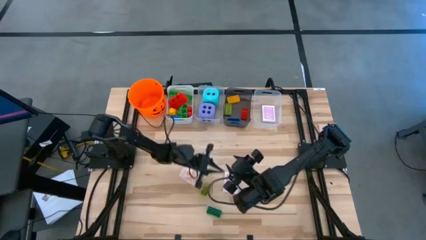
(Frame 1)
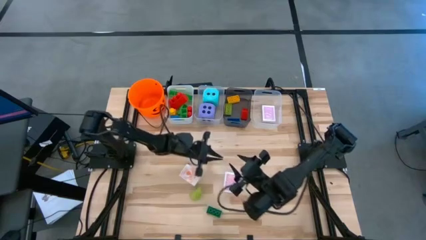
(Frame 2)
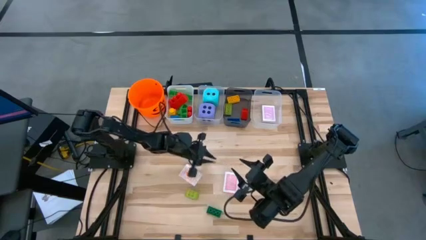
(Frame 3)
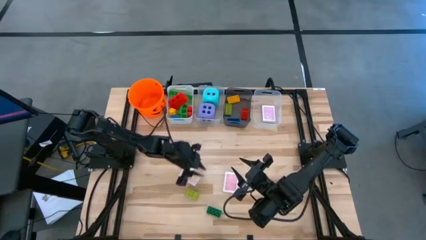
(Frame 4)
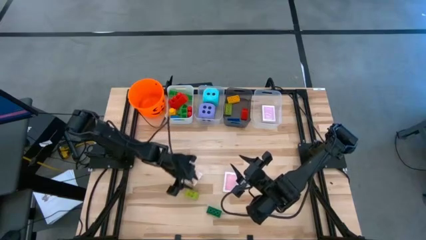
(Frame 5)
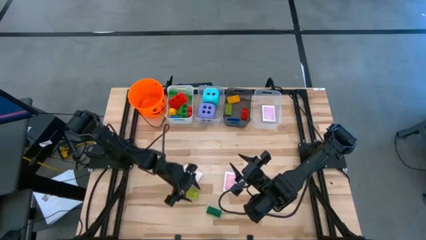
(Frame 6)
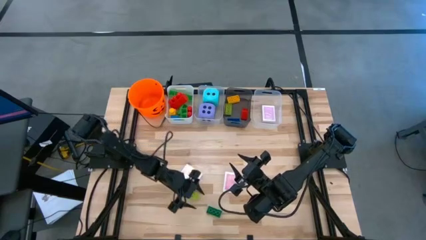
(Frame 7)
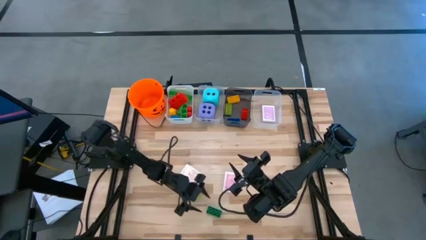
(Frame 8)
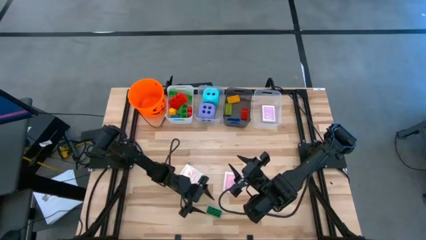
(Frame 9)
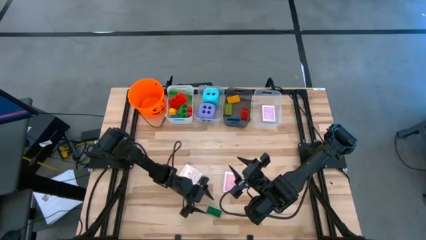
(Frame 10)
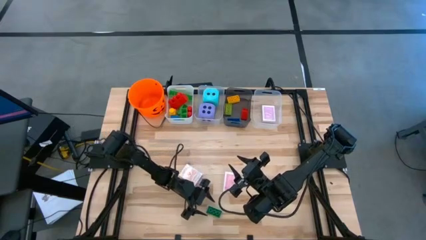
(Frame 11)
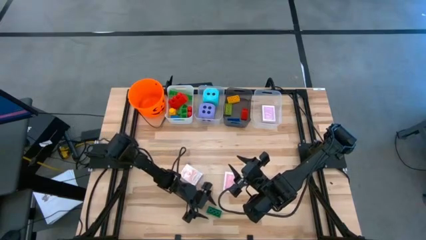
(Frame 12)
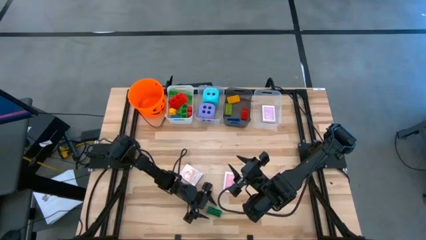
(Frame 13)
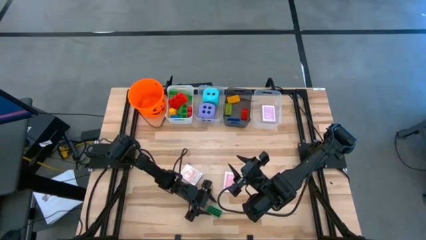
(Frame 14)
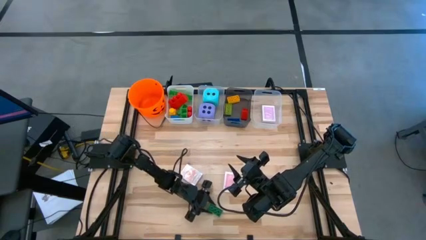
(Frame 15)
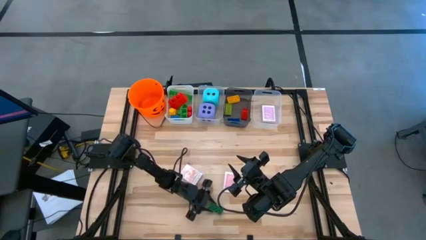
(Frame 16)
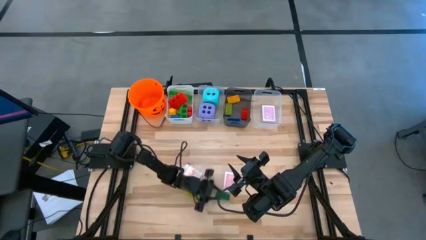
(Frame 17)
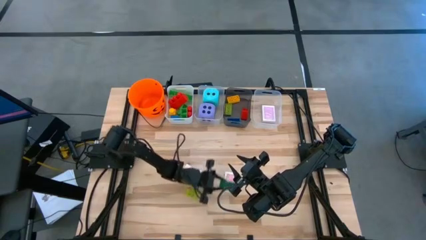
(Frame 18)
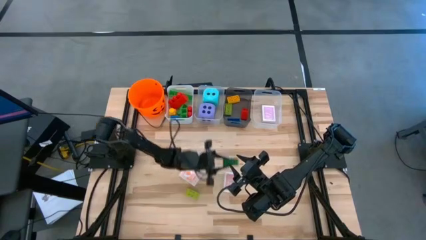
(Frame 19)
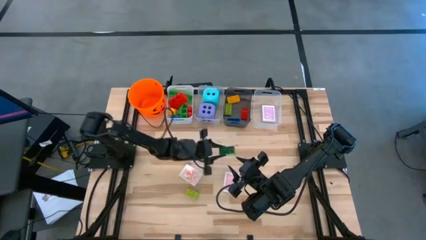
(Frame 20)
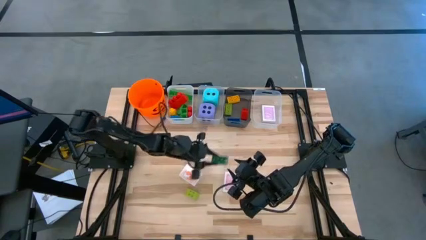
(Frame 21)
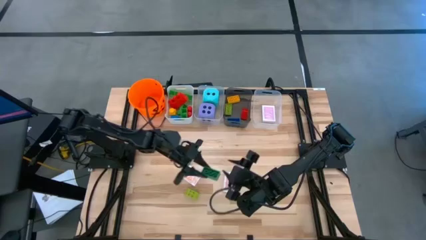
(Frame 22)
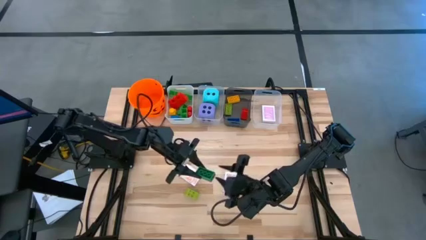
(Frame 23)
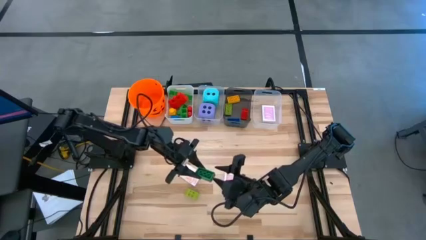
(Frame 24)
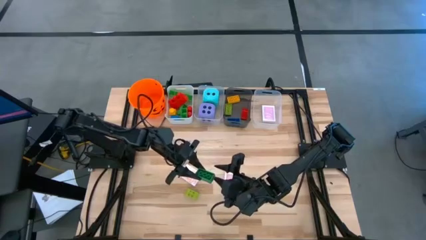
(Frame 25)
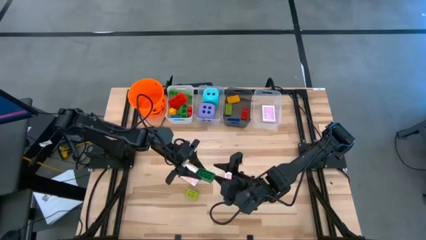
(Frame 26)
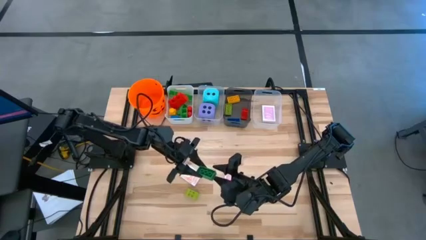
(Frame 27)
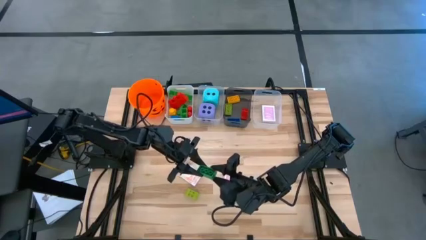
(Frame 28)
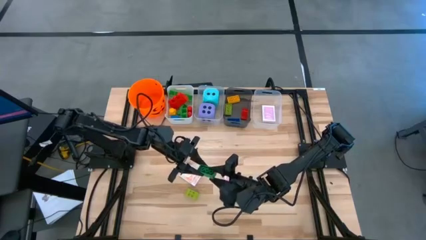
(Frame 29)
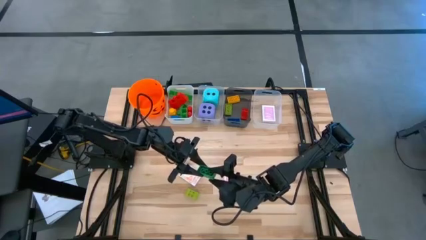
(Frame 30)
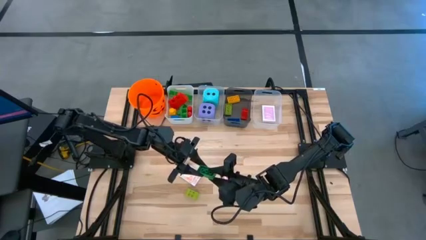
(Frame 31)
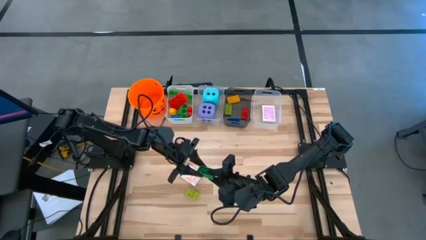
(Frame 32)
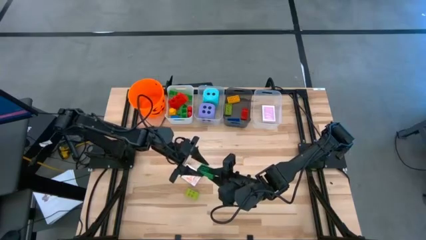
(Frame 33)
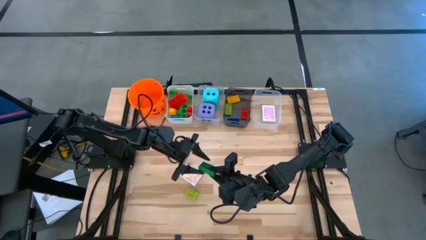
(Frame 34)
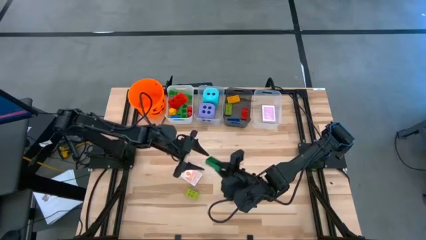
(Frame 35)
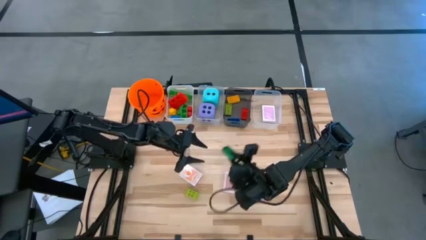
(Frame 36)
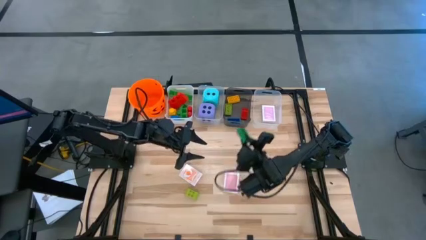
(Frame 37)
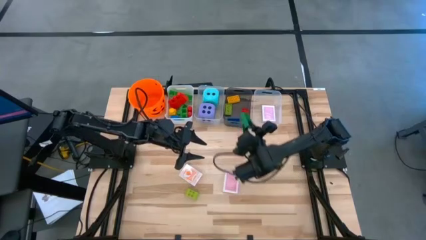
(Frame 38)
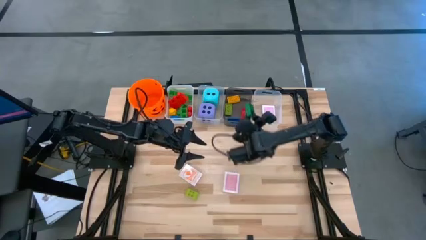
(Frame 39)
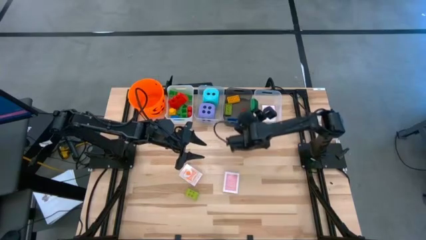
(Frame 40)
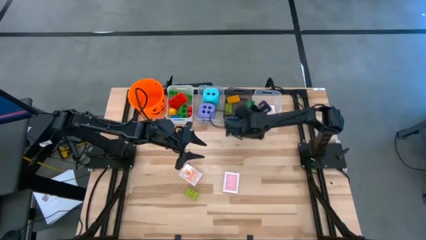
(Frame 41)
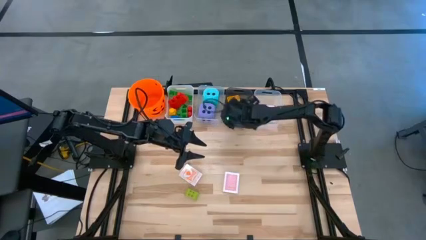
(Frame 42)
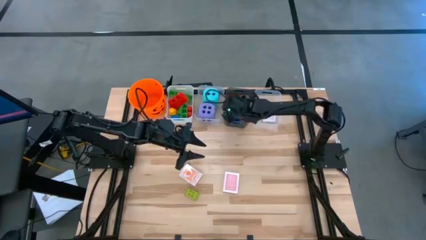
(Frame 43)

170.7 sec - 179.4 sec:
Task: Pick & Place Toys
Put the green game piece into the black bin

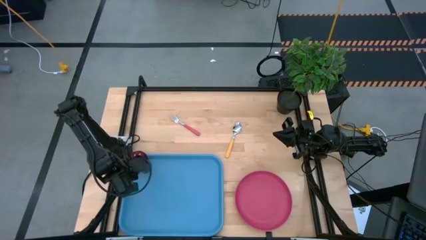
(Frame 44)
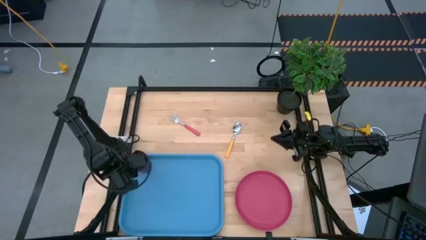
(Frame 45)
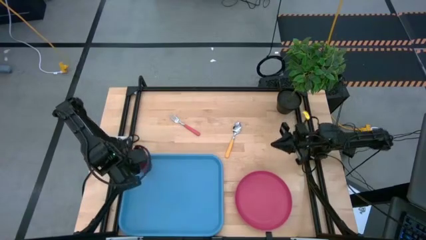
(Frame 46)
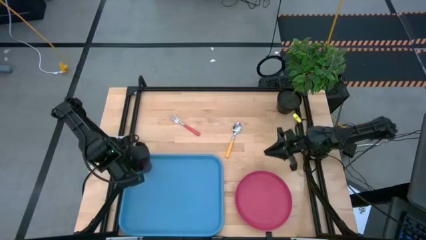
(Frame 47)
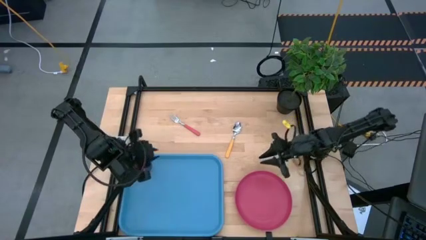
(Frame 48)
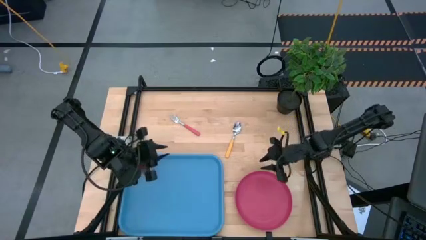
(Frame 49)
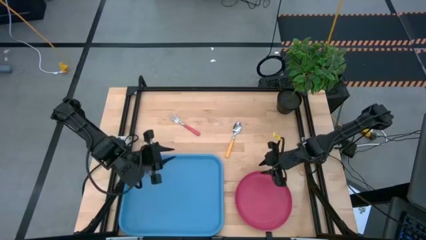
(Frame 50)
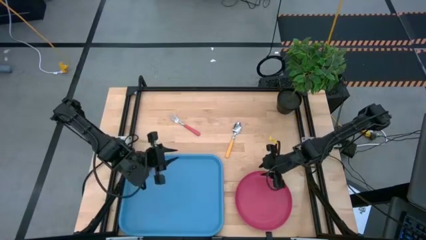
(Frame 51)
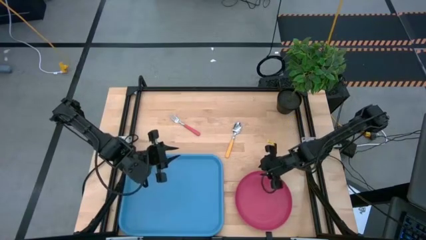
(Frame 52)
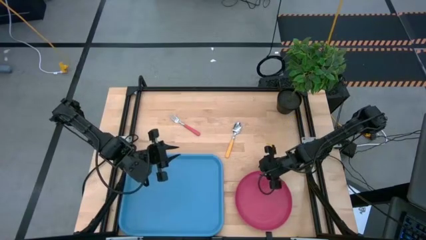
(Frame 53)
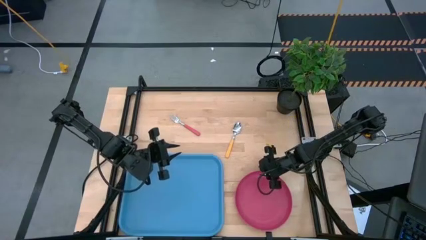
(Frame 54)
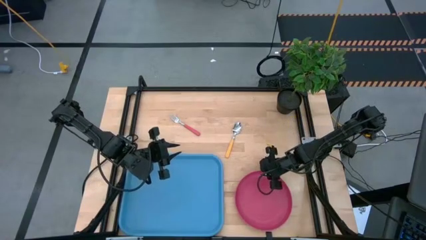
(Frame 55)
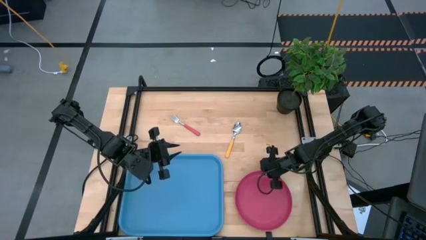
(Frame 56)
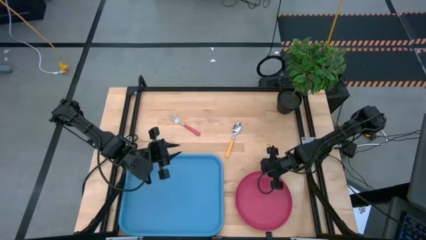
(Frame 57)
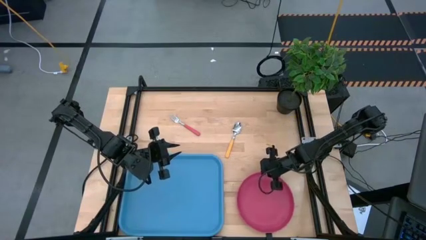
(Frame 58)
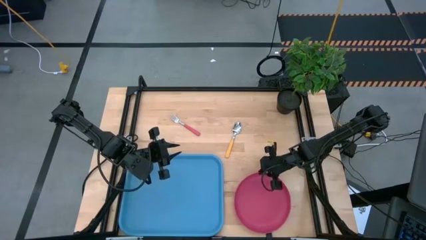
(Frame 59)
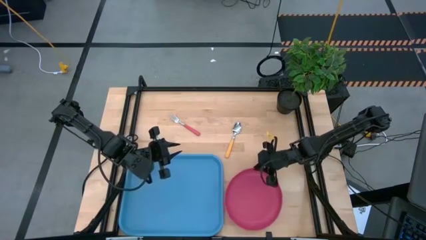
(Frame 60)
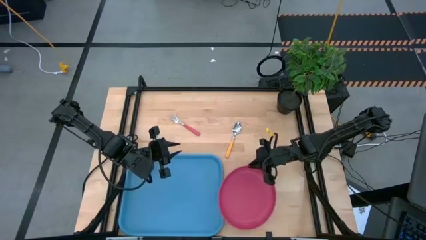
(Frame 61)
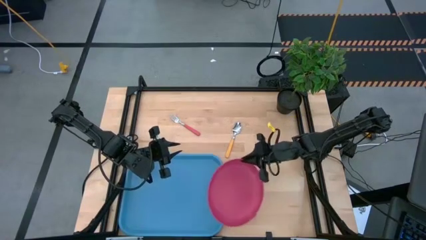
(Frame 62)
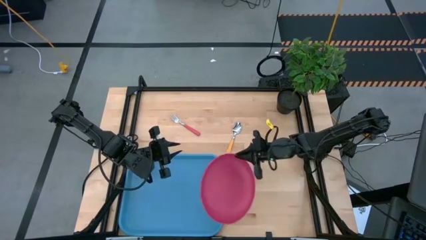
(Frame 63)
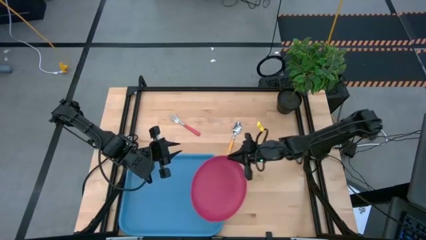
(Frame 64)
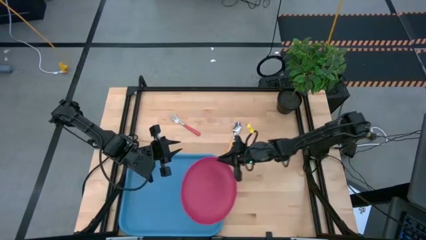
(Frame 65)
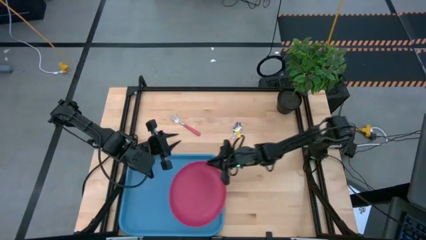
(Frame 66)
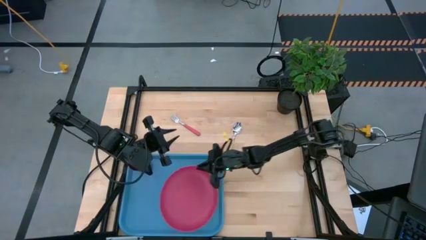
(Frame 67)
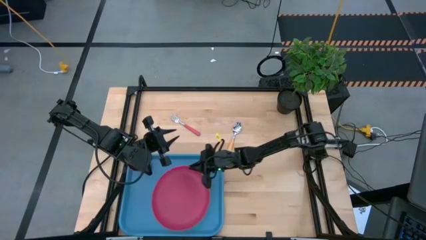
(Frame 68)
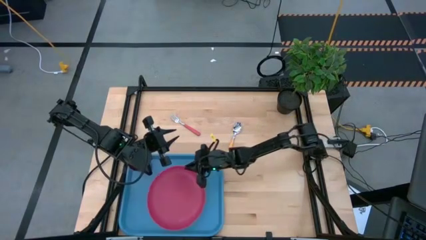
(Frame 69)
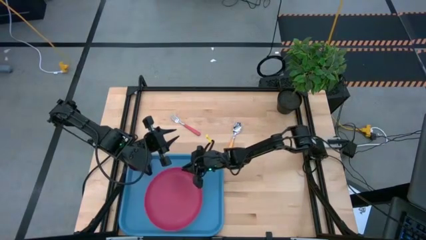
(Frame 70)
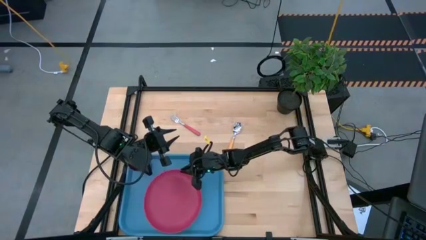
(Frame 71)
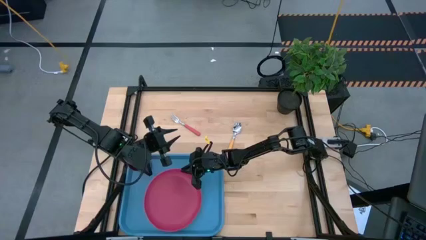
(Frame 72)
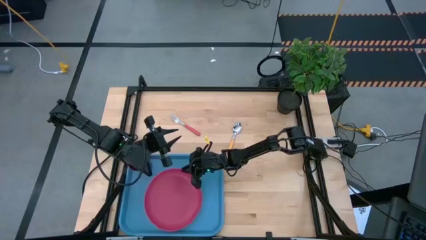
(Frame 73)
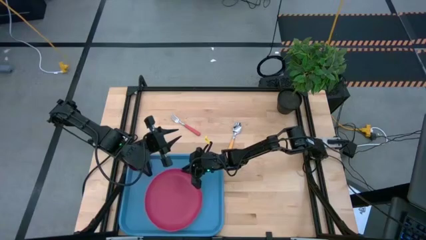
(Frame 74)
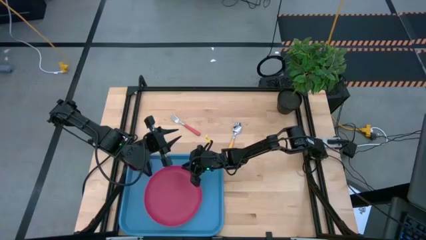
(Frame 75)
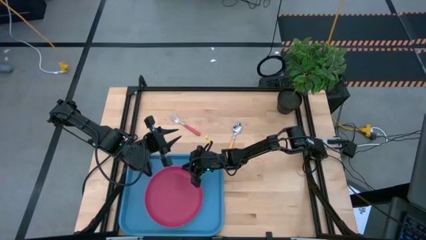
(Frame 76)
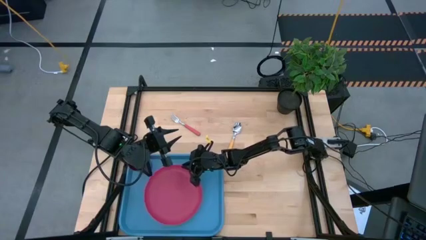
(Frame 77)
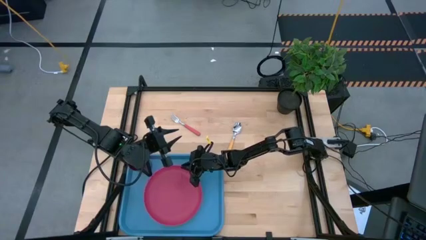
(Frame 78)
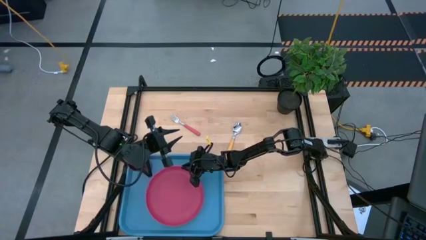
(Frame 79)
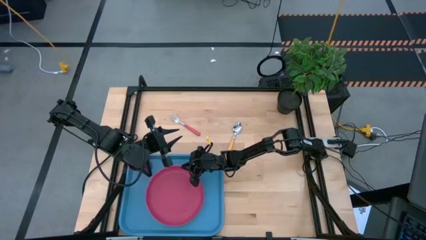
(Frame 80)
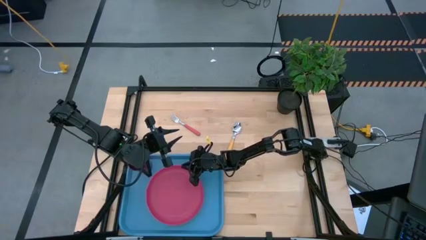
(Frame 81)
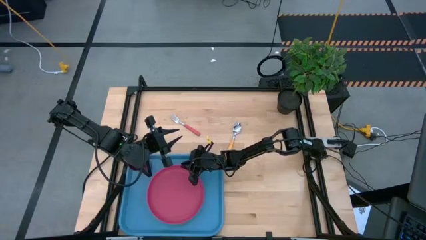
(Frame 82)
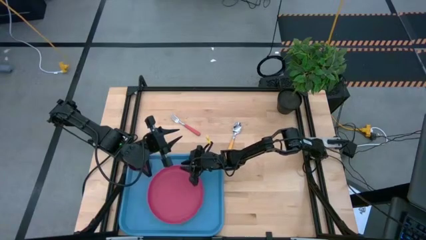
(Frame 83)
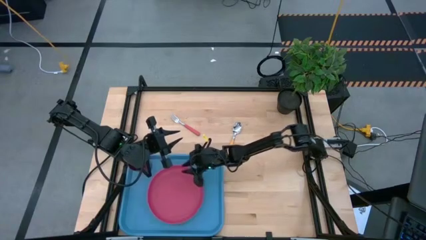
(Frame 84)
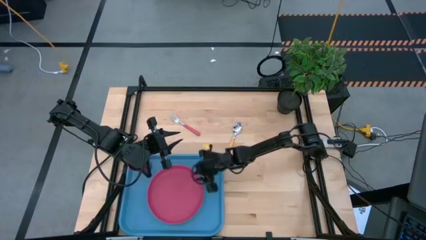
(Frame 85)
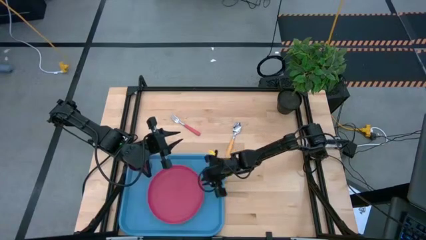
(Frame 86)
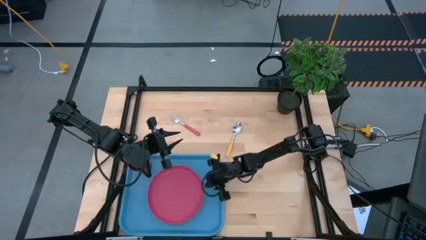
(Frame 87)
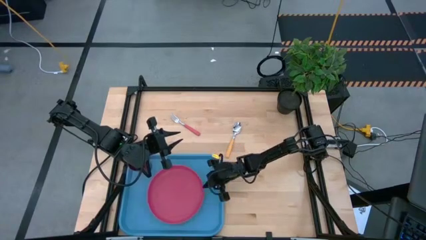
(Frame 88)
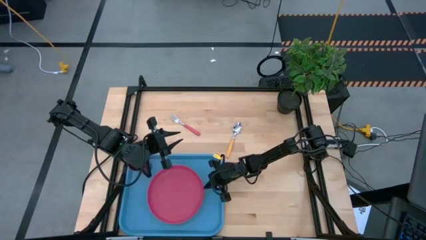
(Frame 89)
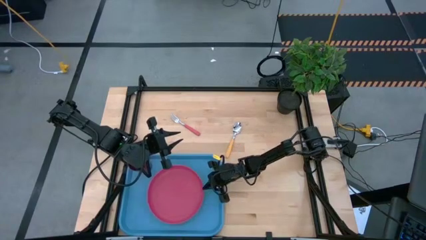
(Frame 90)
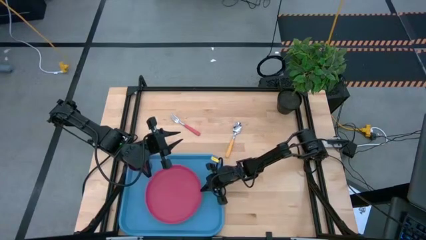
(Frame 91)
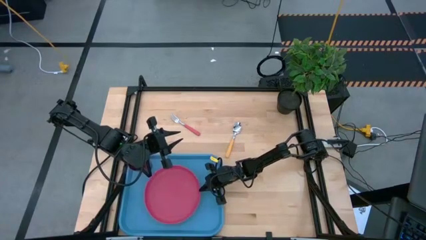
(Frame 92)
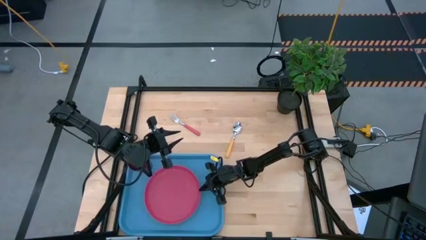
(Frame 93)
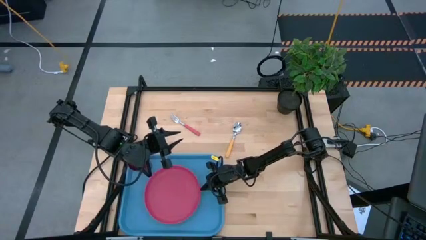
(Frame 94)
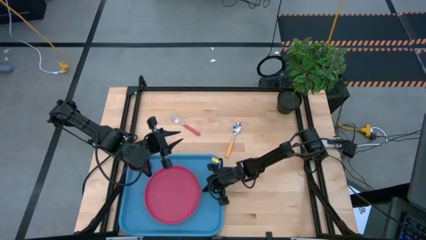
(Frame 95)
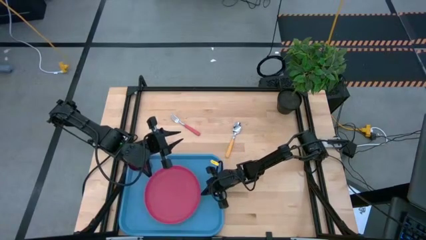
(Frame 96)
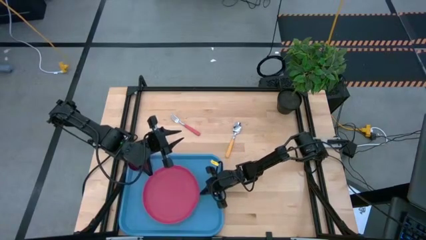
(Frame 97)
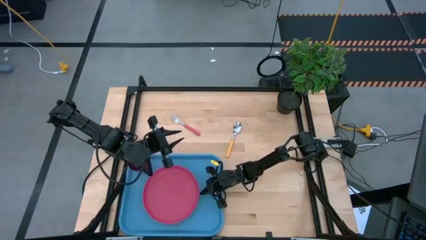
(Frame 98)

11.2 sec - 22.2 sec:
Task: Pick and place plate/cup/fork/spoon on tray
Put the pink plate on the center of the blue serving tray
